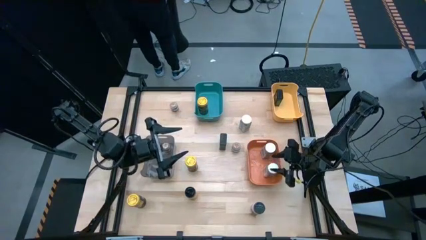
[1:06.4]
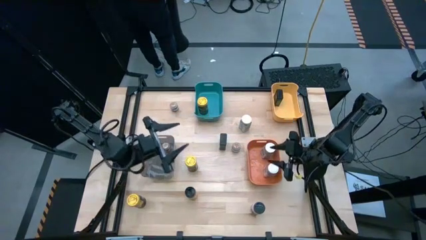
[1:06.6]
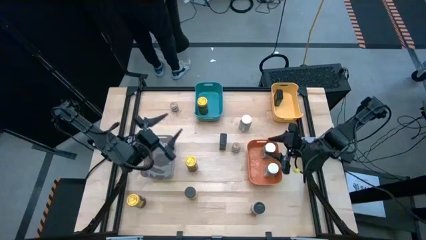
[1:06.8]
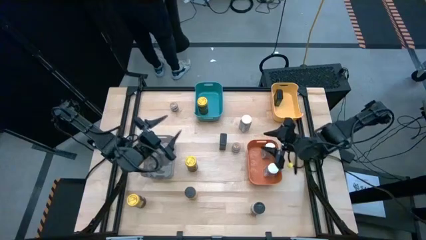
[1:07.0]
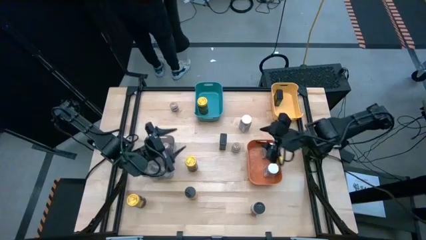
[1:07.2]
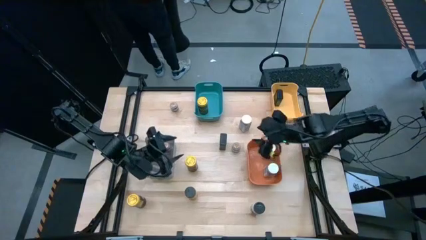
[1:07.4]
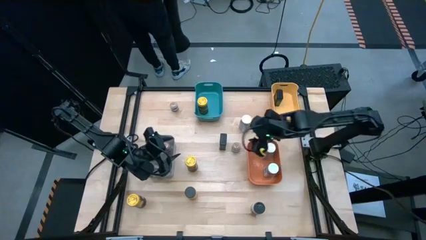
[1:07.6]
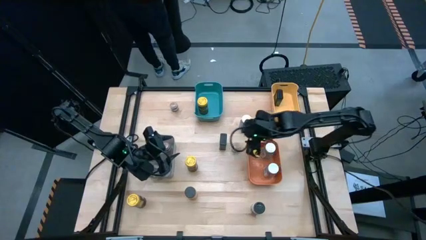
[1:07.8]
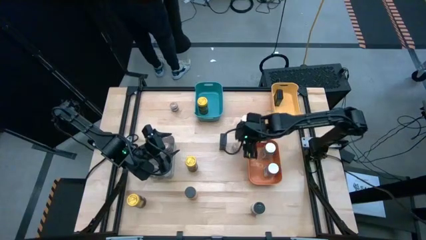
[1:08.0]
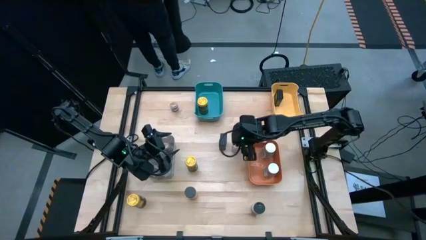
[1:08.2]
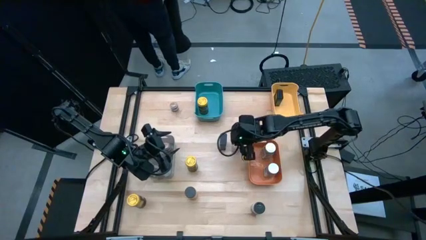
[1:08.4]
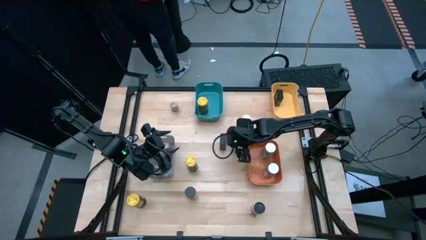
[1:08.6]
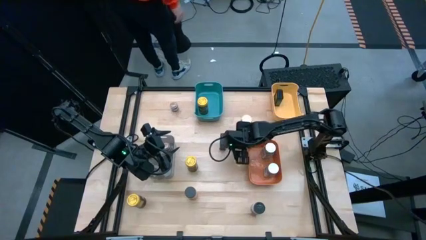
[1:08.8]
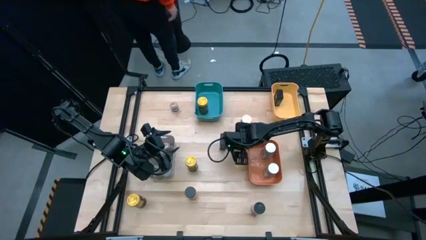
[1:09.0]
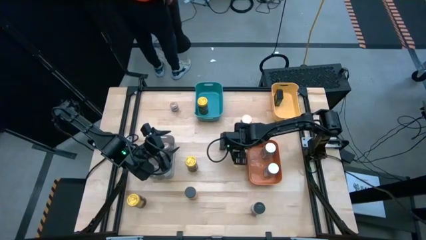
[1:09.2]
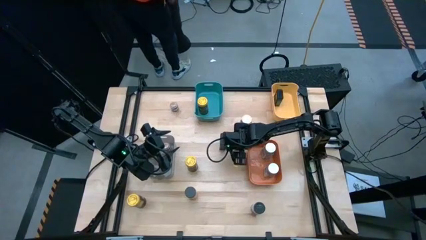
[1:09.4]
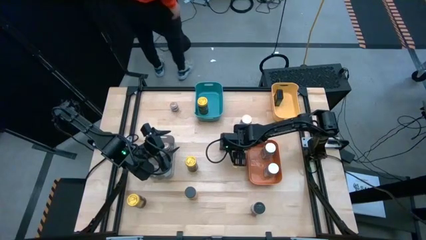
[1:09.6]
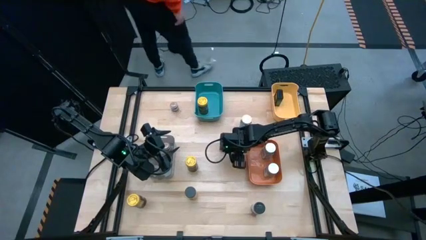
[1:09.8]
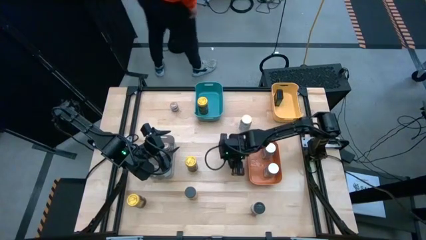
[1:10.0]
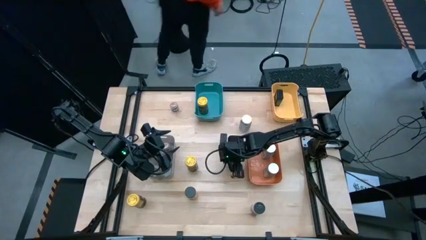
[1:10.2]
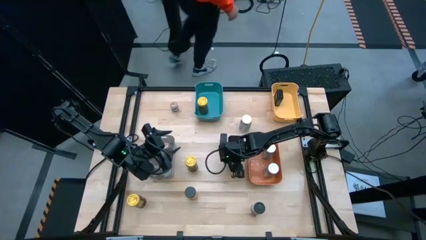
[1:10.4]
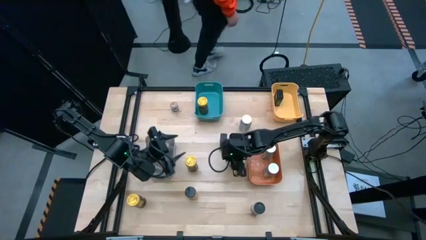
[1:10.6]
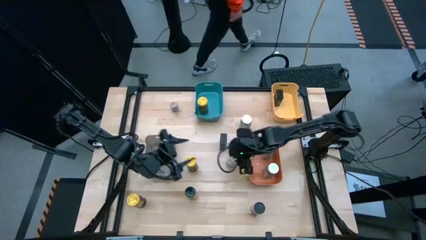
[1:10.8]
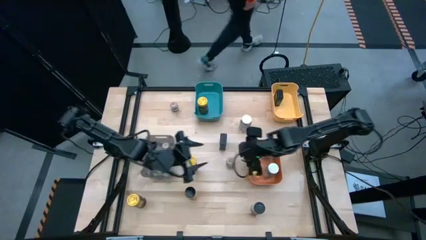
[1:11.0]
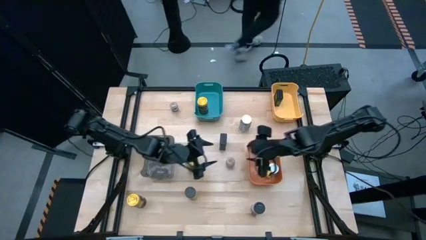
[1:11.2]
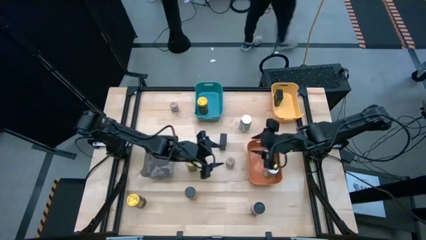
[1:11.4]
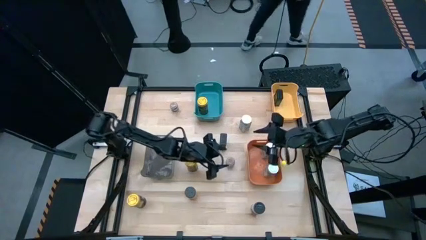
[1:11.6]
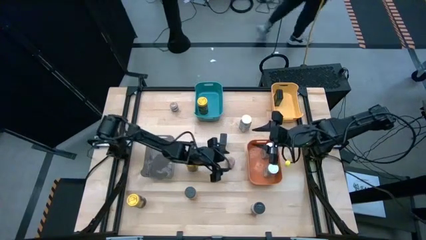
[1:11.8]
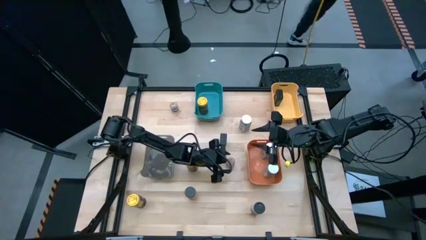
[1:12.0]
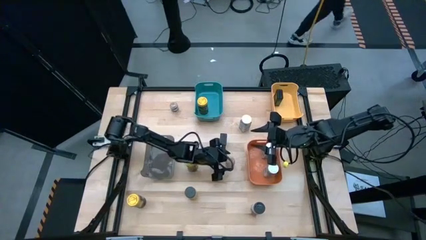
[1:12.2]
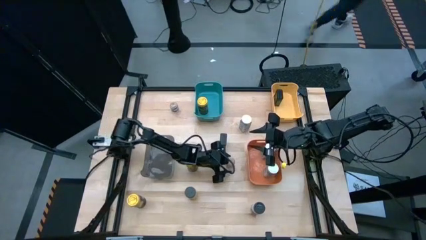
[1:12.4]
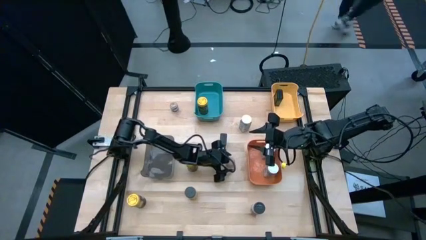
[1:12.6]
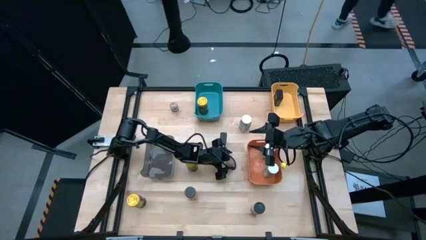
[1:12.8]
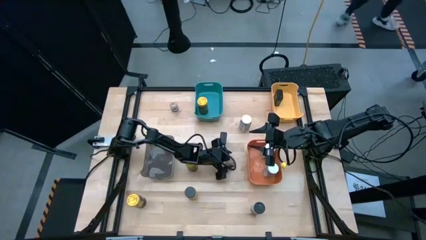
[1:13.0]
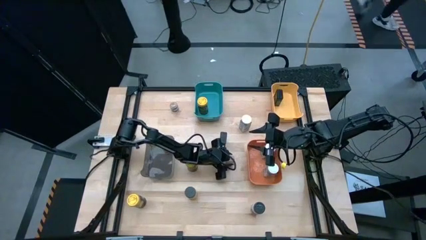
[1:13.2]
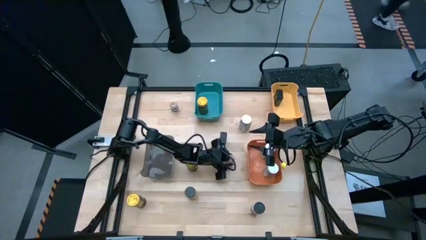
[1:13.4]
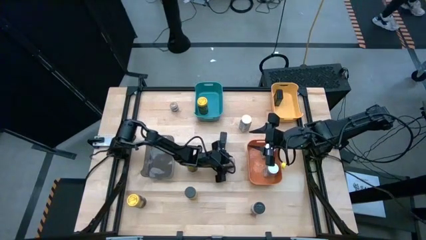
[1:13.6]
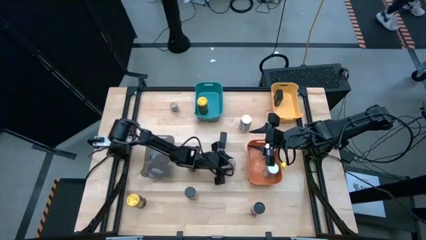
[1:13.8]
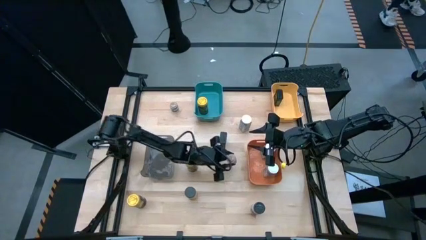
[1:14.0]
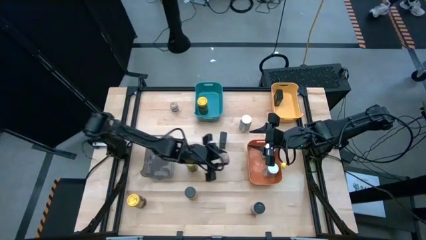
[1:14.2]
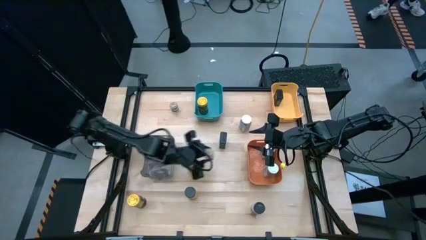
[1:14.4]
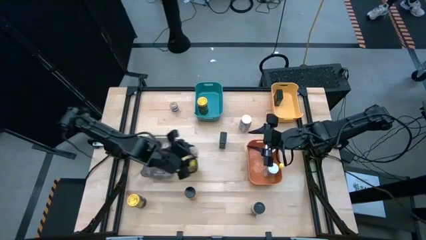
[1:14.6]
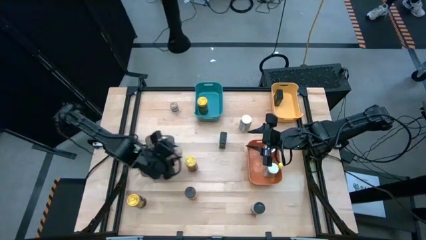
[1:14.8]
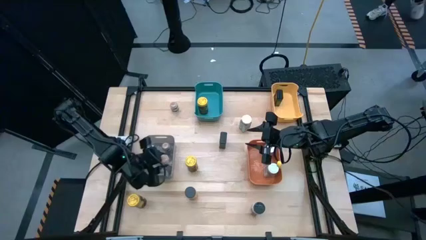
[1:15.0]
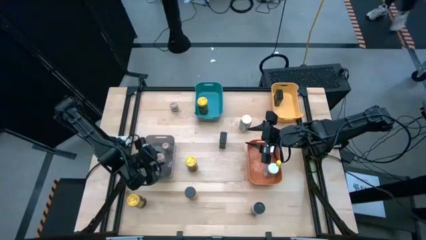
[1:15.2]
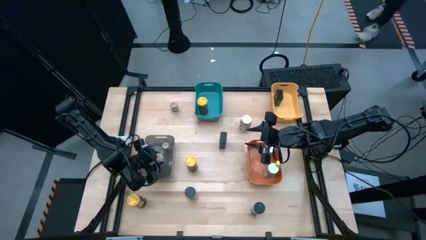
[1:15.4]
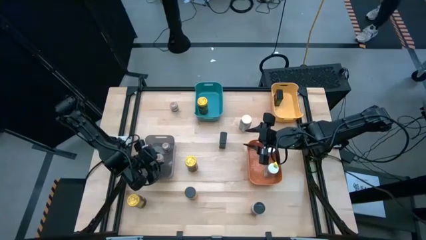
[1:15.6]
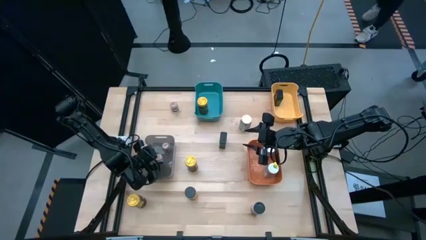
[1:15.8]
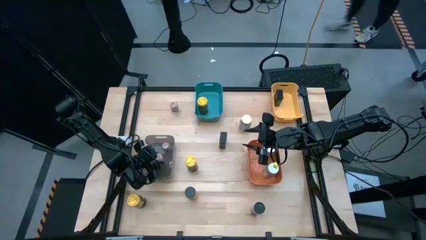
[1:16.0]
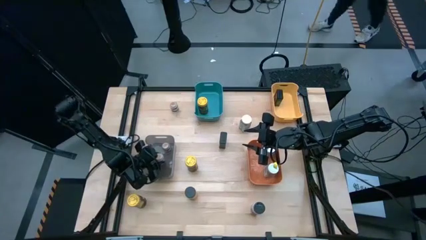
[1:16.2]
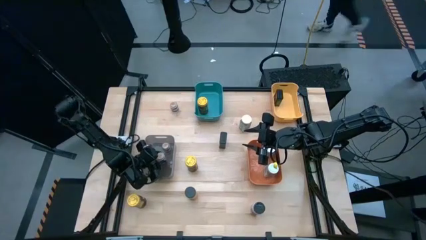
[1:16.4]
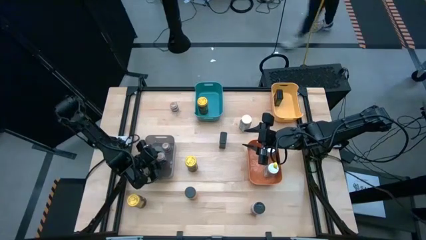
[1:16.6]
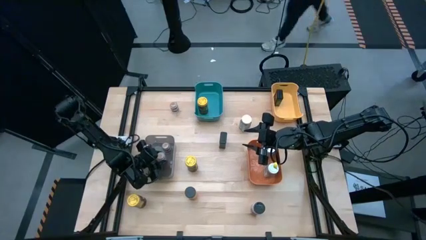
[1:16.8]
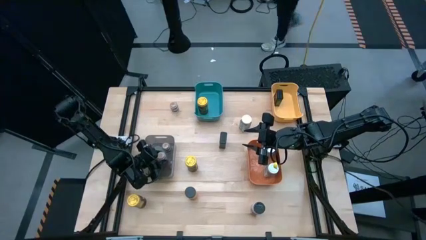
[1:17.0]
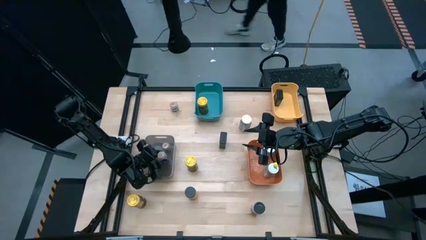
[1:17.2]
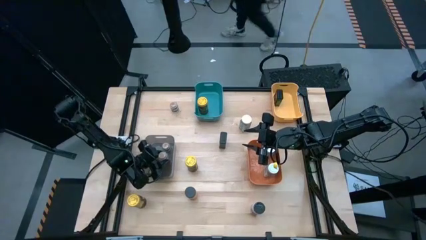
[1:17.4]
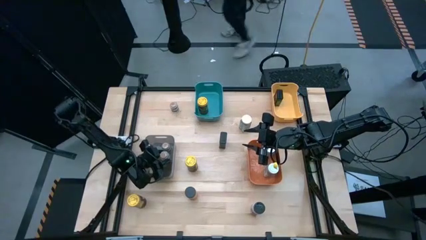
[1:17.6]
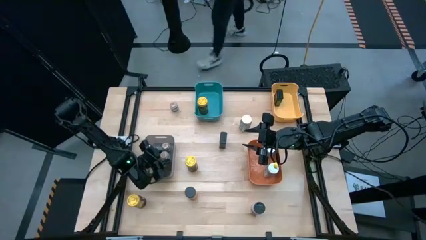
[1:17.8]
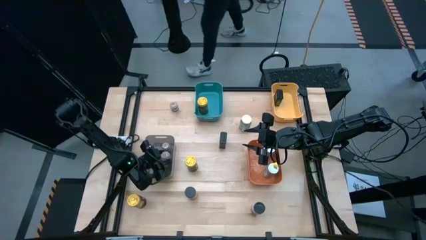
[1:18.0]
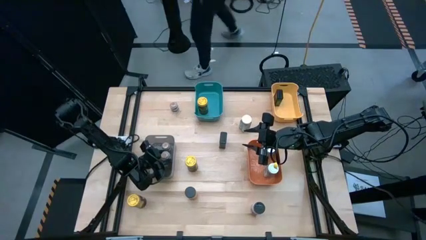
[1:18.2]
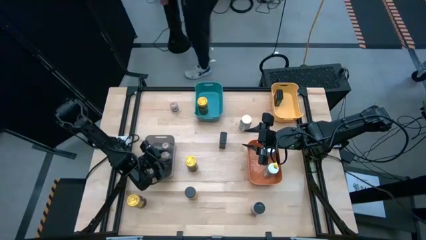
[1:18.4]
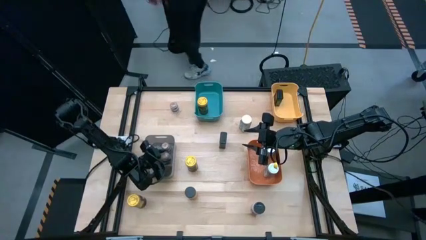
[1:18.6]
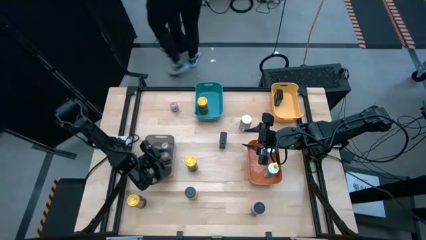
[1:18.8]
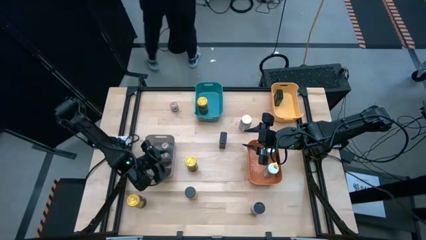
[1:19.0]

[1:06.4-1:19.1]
Task: Sort spices by type
Put the right brown seasoning bottle into the black bin

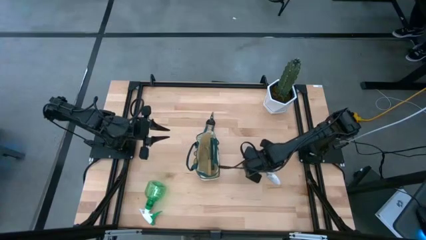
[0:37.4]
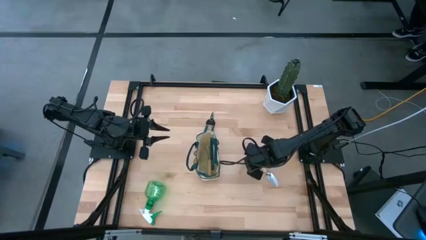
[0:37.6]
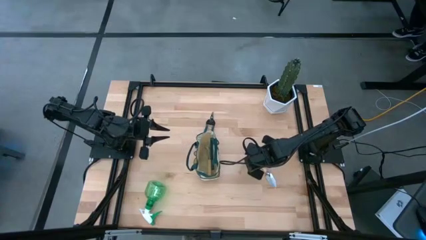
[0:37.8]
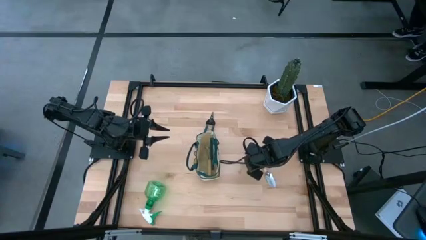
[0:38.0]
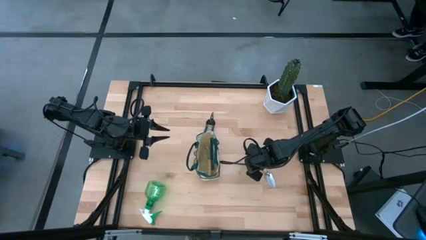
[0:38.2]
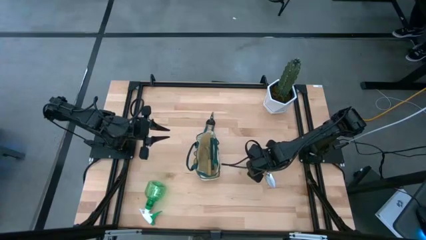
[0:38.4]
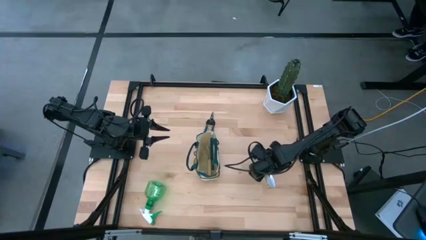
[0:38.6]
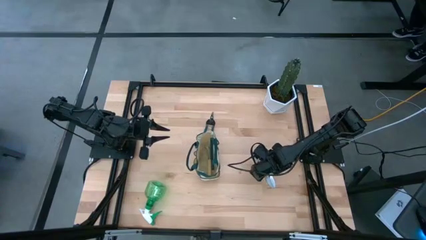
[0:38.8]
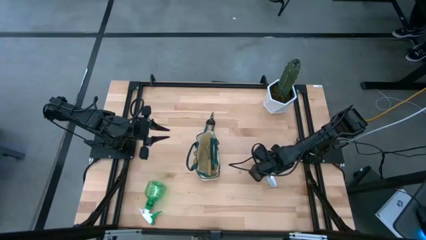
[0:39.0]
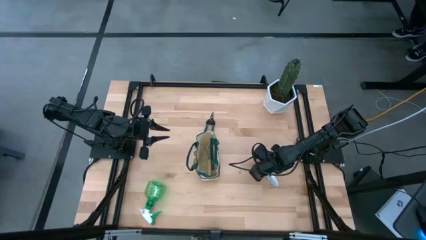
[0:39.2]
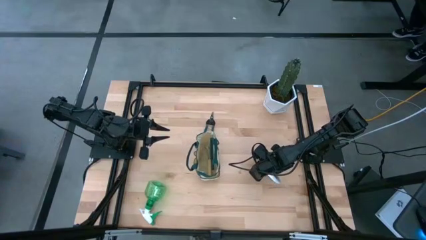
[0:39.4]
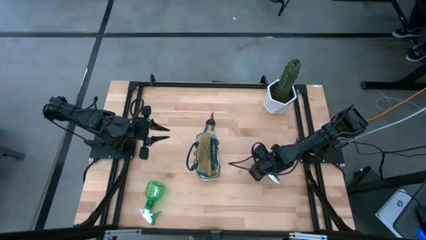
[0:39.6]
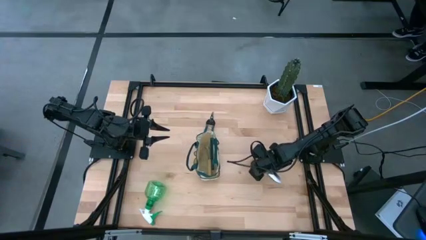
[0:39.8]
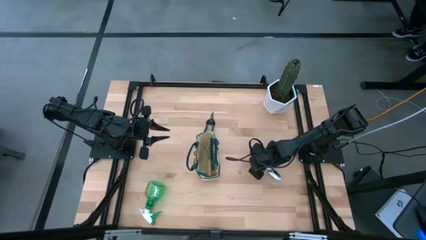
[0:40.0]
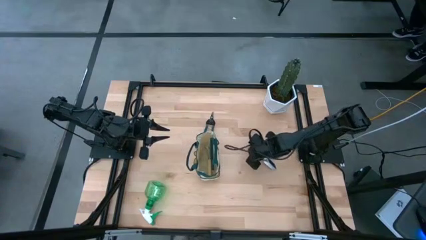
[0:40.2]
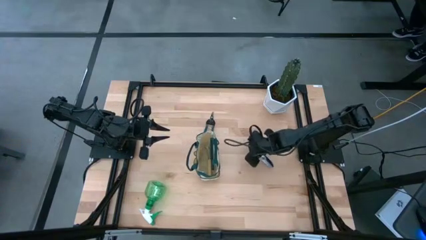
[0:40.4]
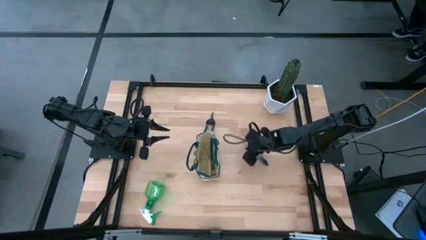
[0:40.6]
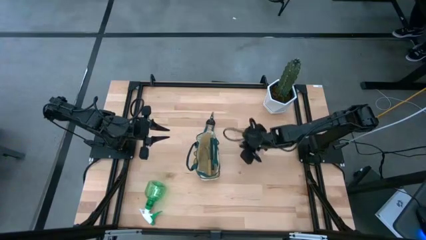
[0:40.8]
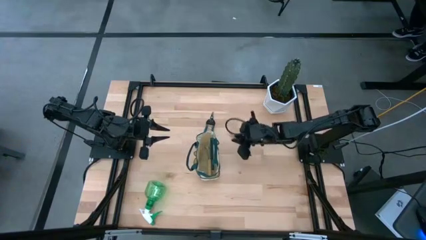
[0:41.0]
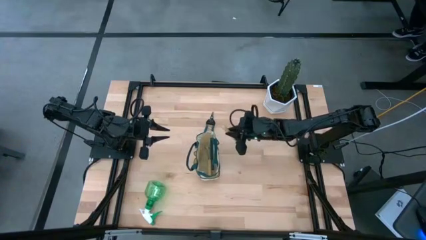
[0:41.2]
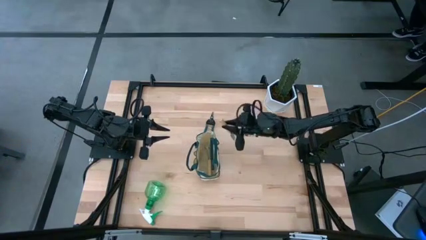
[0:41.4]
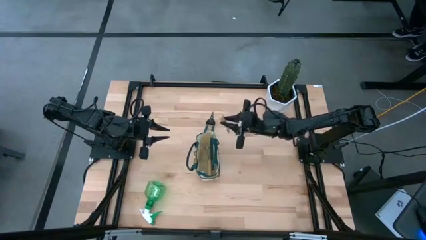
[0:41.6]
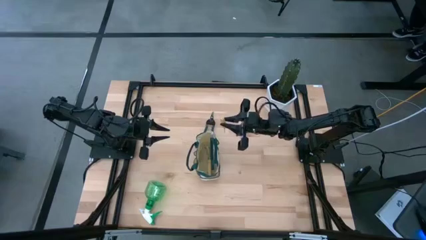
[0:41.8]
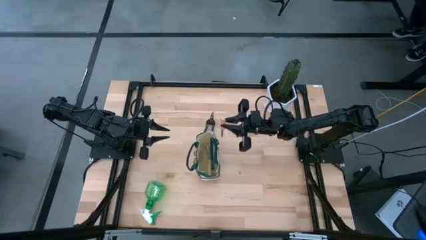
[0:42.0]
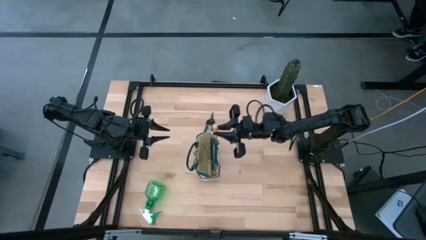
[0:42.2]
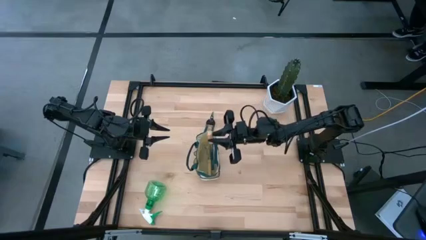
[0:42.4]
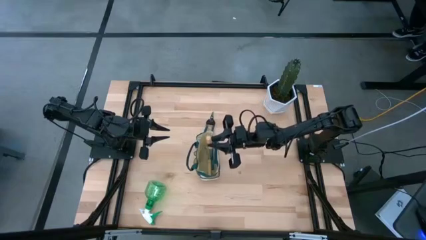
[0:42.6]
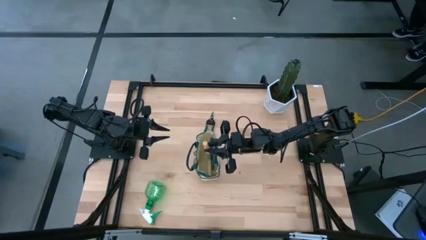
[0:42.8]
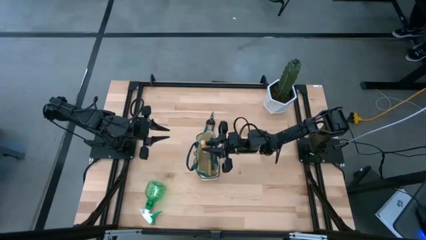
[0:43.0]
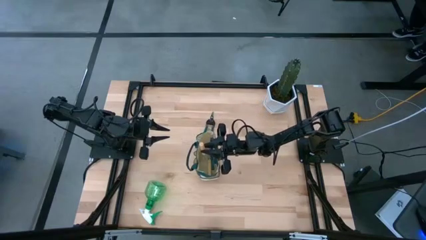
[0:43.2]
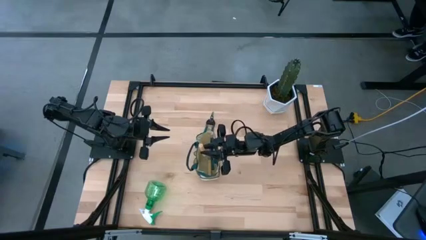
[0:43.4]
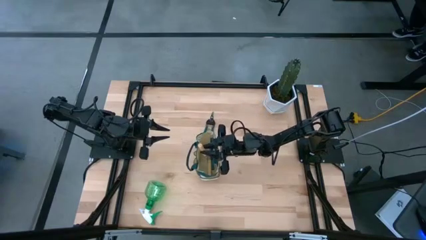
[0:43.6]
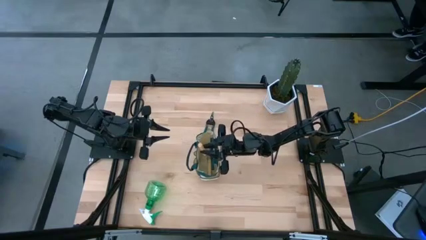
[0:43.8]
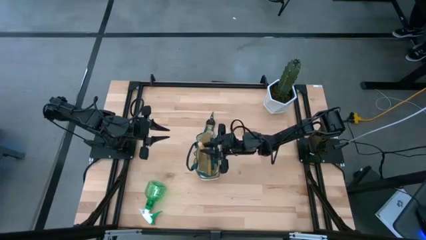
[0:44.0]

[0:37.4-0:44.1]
Task: Pick & Place Garden tools in Gardening bag
Put the brown trowel into the gardening bag
